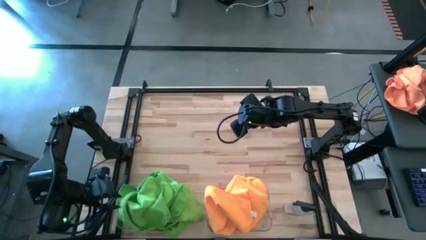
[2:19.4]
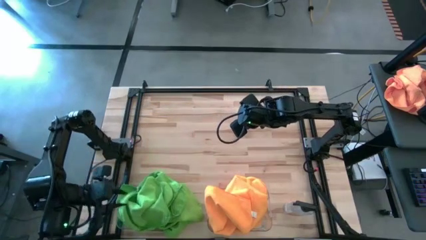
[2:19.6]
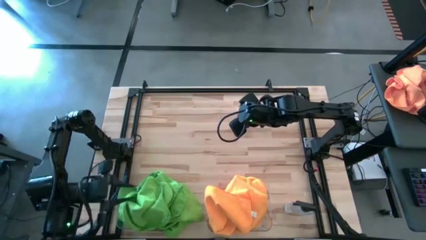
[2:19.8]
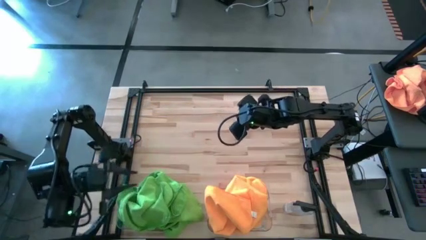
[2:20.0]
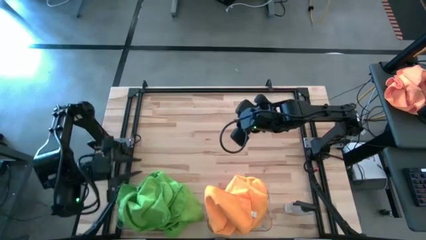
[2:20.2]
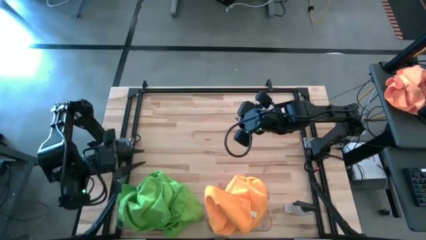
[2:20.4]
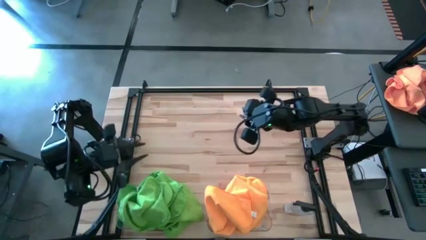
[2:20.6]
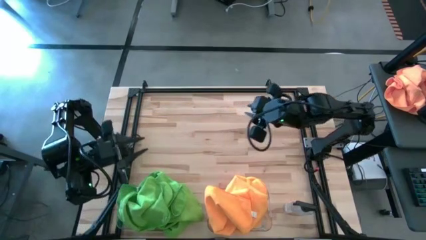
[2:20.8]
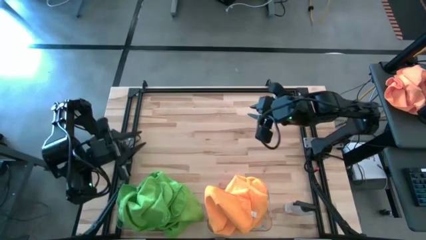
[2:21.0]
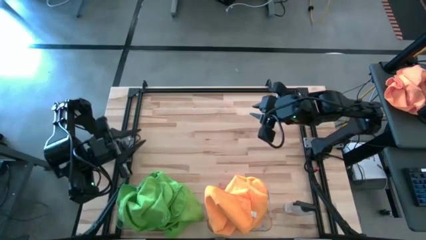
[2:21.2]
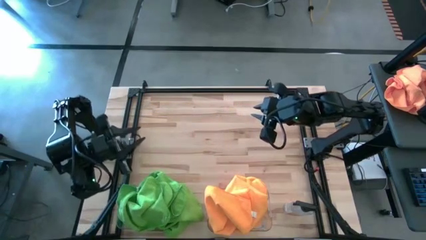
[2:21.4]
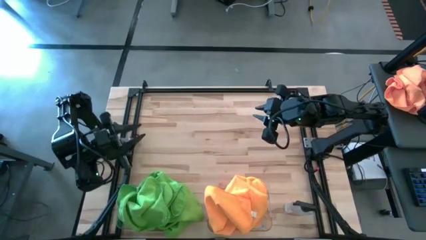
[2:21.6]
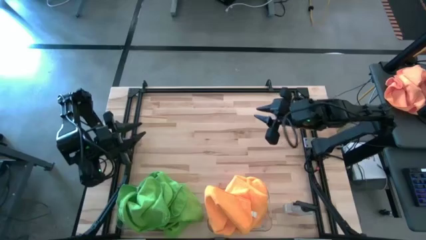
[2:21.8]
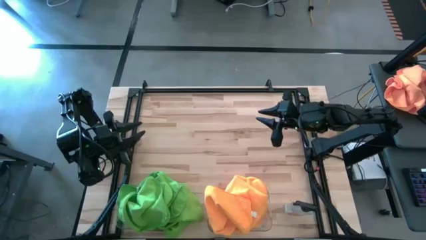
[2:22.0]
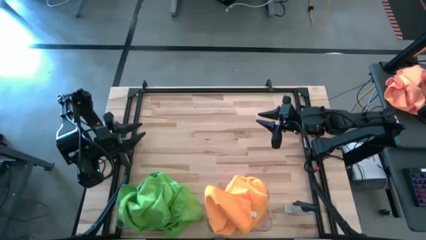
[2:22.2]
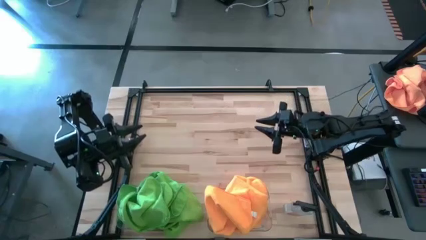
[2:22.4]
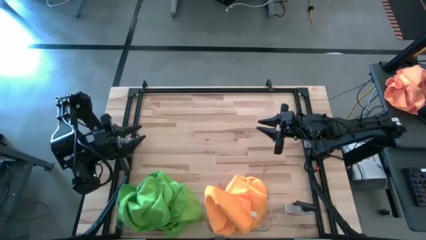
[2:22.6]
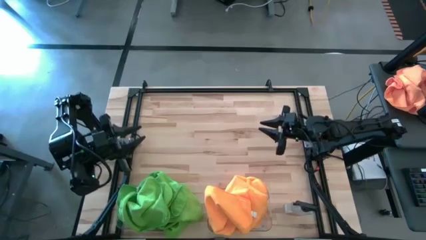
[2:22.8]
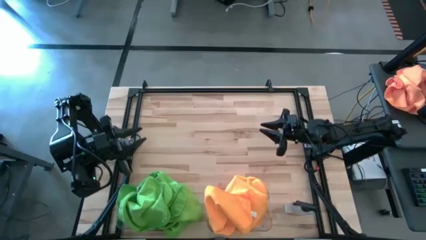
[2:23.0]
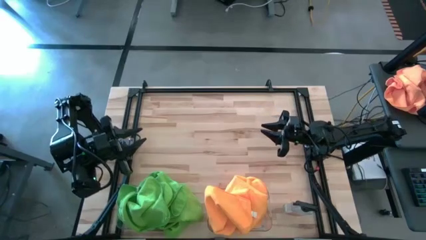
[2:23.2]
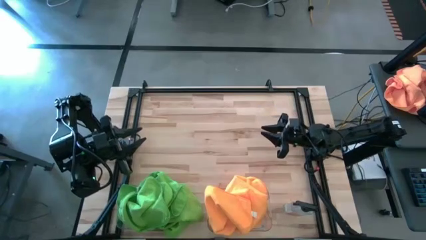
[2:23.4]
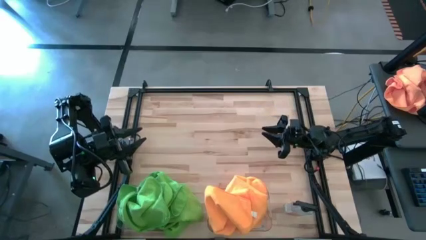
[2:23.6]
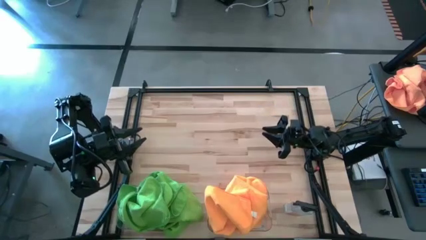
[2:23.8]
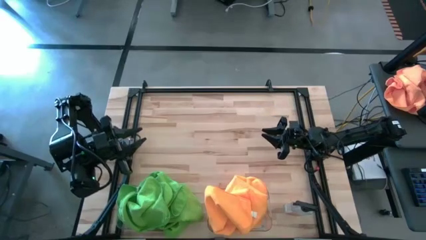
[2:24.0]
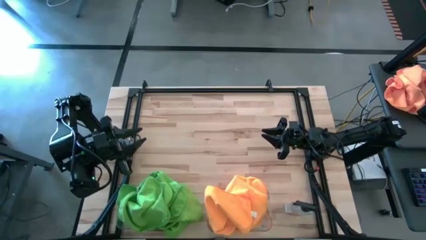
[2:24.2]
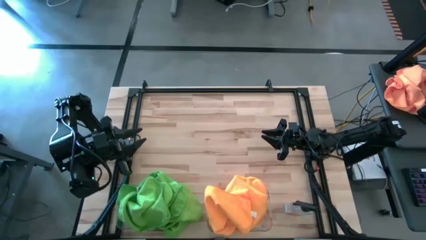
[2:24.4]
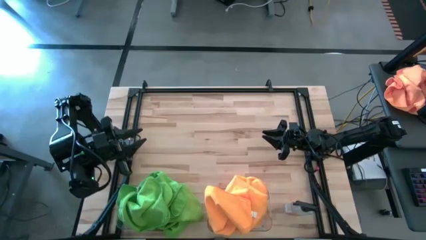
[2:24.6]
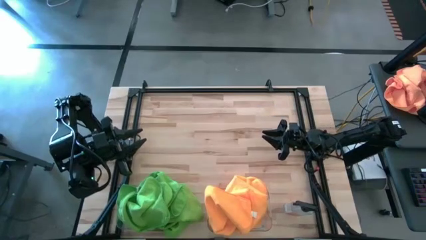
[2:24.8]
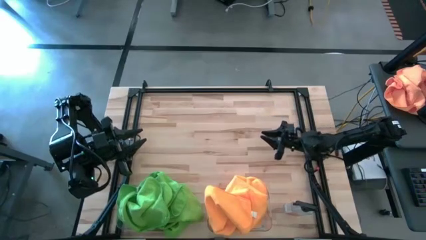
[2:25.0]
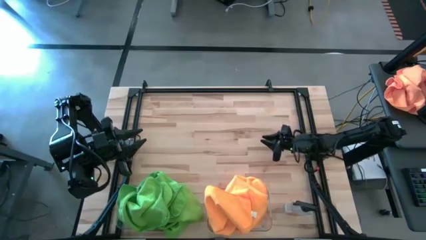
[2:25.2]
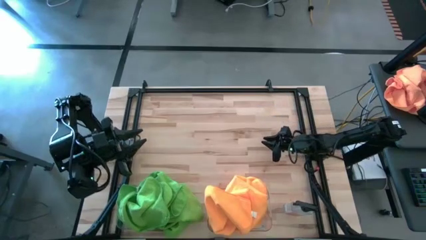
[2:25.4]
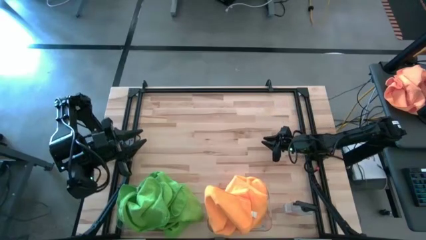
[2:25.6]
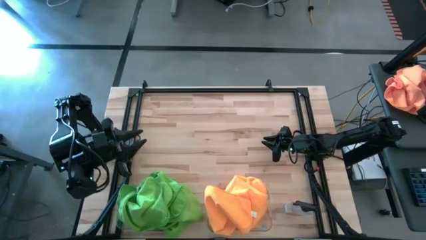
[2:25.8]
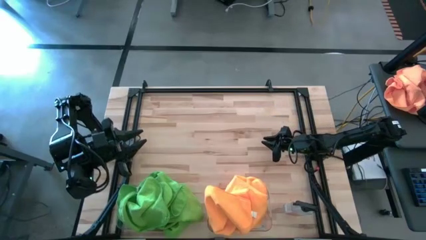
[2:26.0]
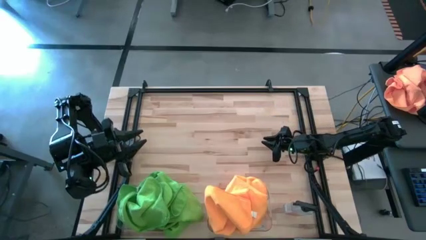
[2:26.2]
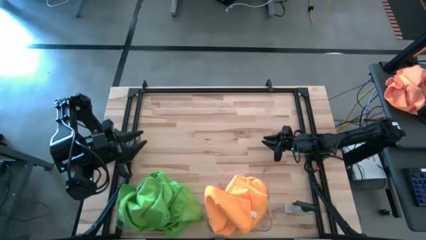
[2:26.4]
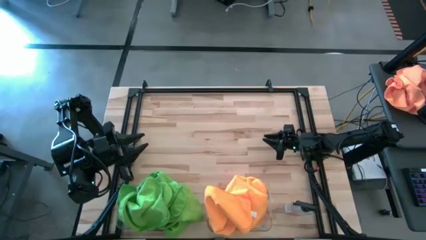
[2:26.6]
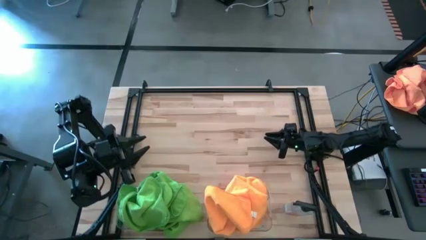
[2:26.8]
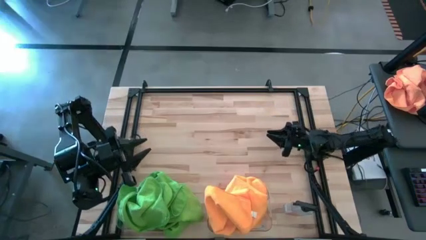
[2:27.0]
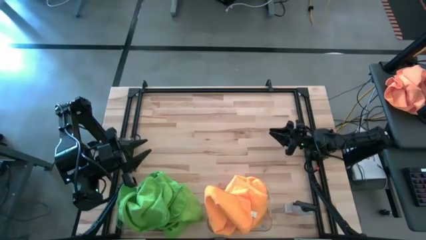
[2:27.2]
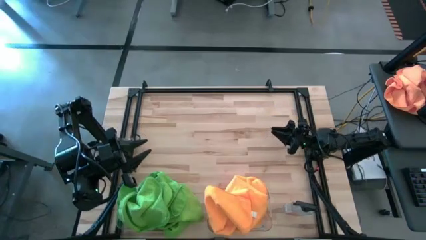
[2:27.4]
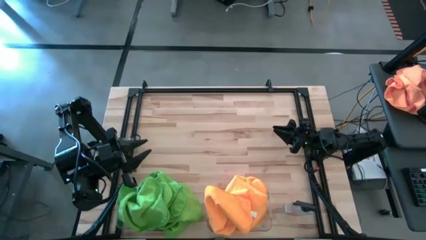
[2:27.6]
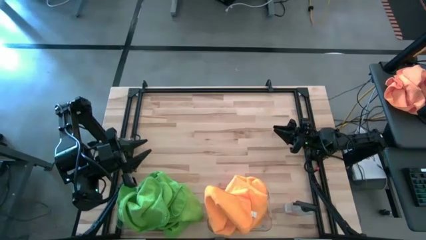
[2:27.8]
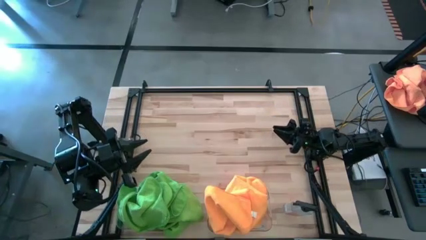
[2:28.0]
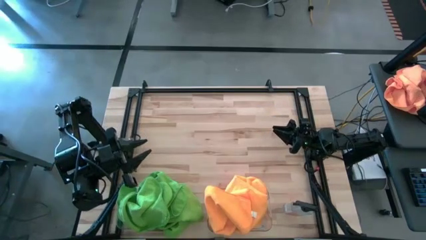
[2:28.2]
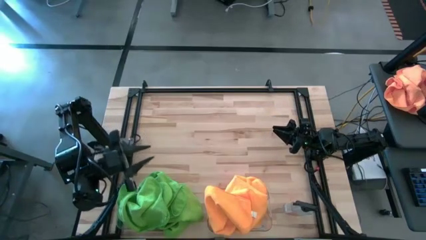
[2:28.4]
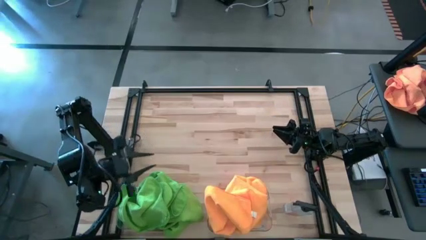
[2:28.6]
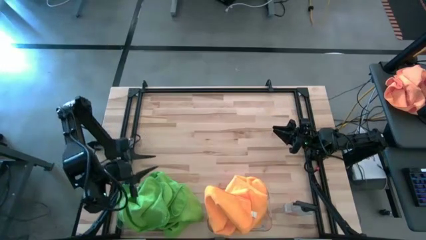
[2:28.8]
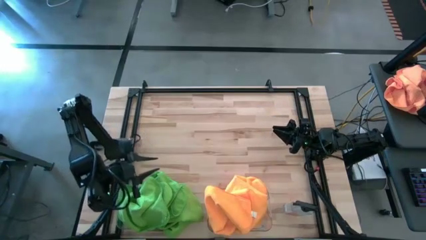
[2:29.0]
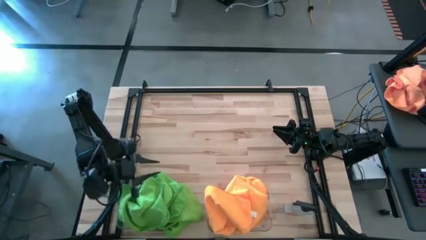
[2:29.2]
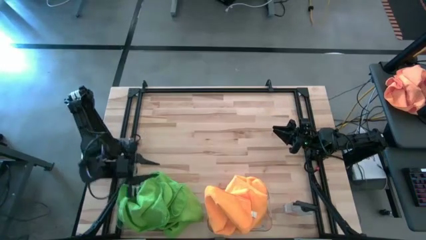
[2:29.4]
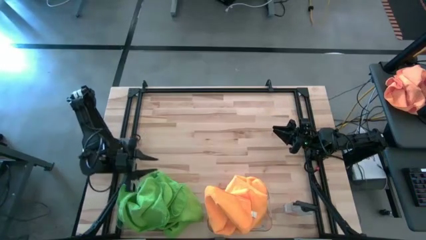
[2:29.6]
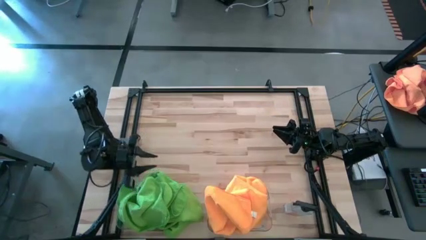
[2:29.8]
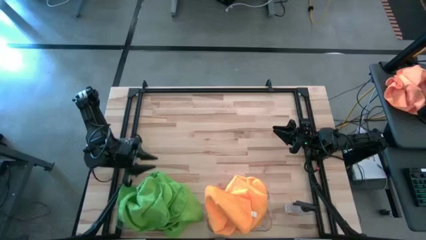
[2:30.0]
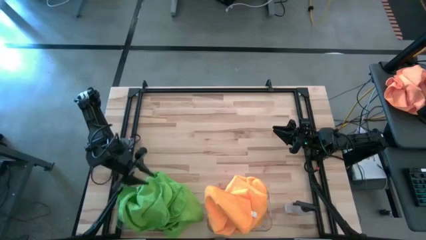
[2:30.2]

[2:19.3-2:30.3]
Task: Sort microfiber towel by color & place in baskets
Return to Home Position

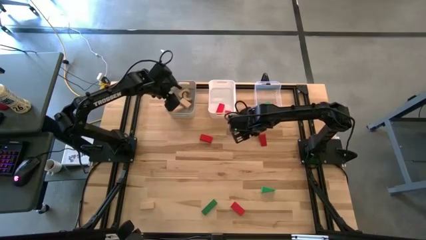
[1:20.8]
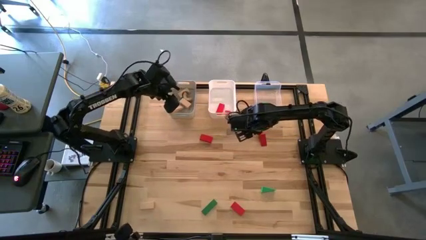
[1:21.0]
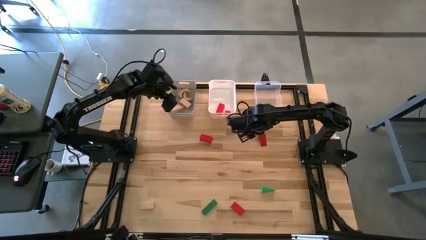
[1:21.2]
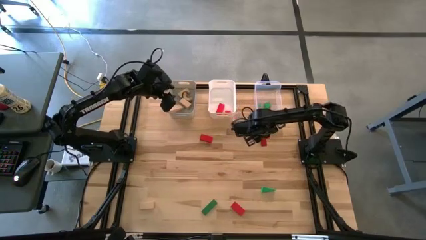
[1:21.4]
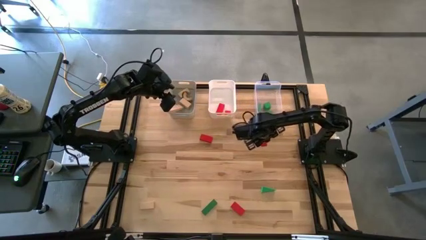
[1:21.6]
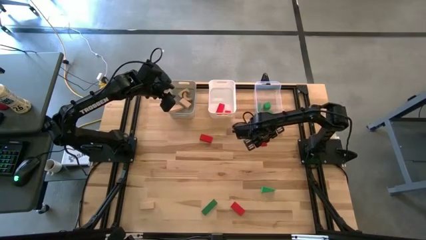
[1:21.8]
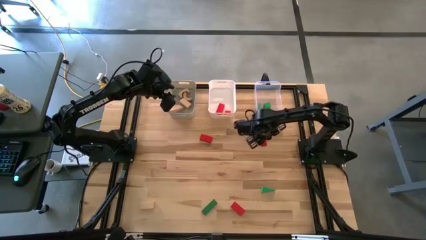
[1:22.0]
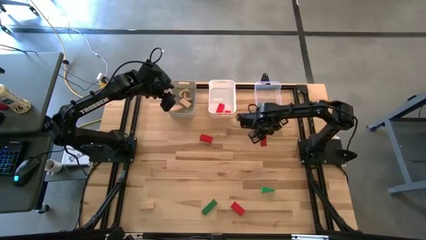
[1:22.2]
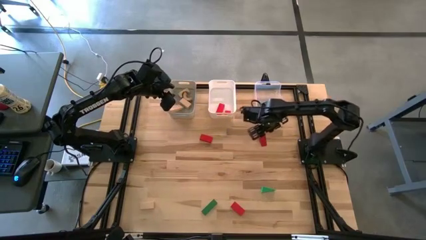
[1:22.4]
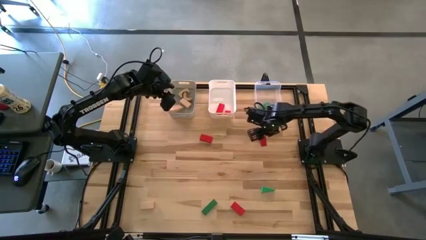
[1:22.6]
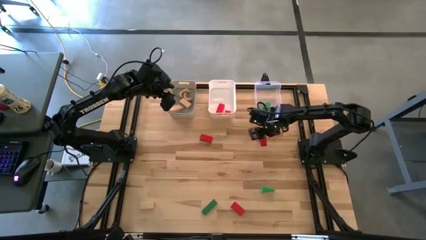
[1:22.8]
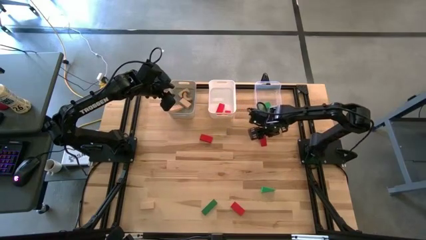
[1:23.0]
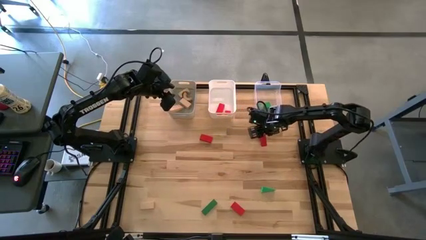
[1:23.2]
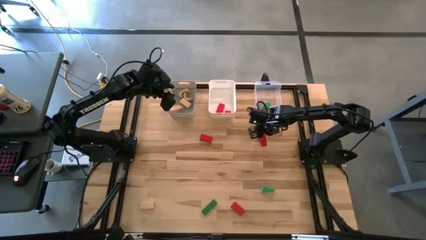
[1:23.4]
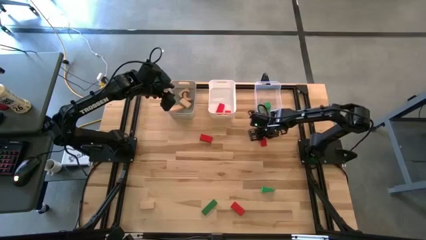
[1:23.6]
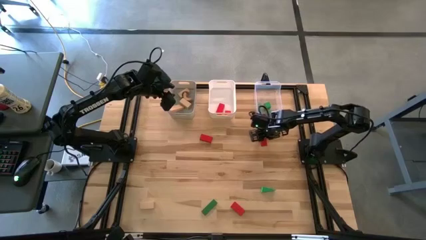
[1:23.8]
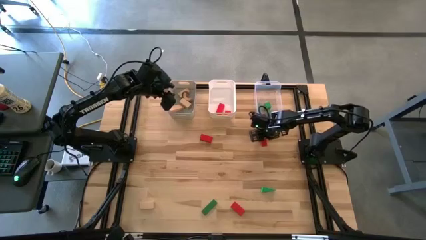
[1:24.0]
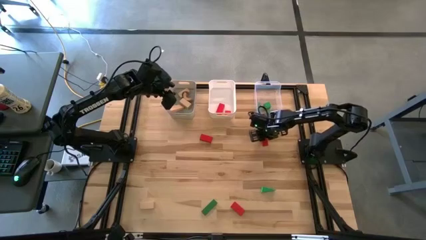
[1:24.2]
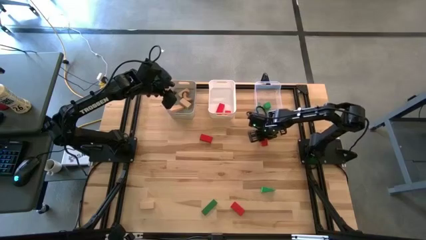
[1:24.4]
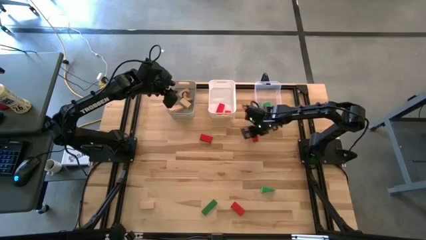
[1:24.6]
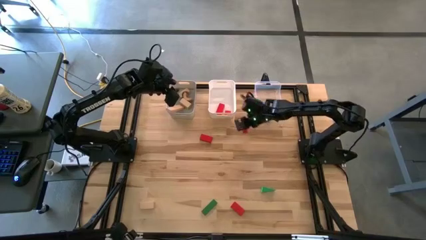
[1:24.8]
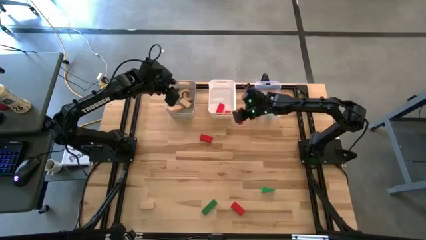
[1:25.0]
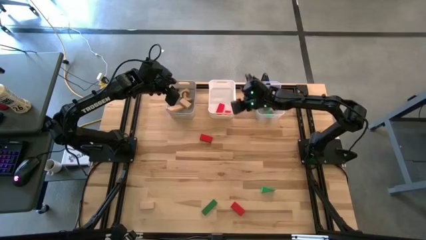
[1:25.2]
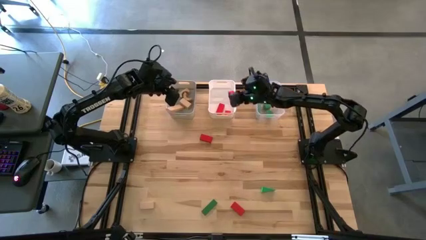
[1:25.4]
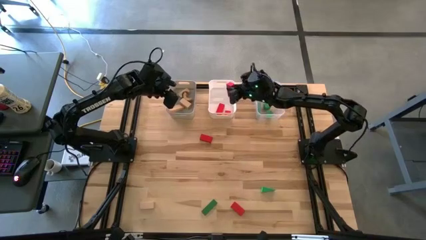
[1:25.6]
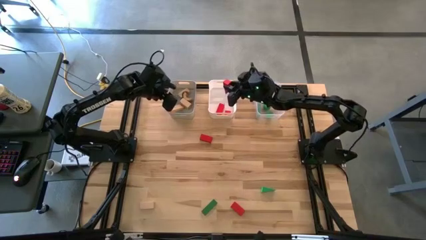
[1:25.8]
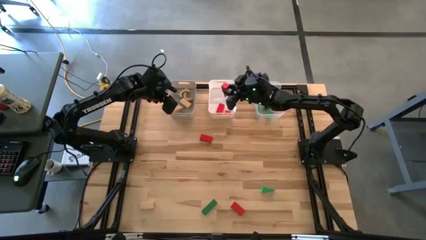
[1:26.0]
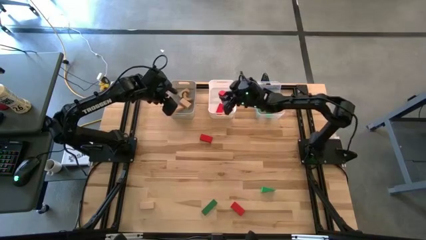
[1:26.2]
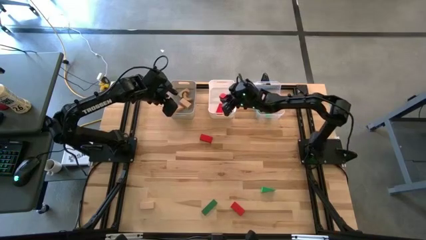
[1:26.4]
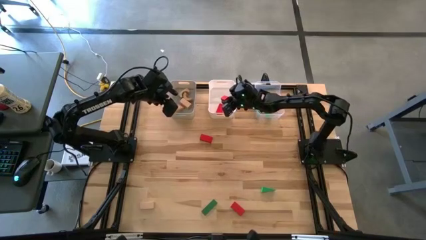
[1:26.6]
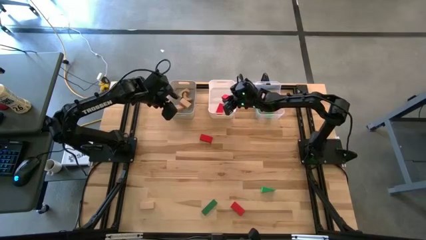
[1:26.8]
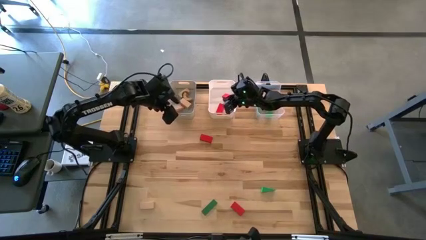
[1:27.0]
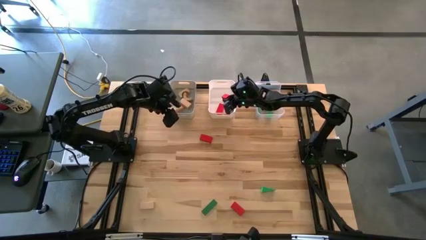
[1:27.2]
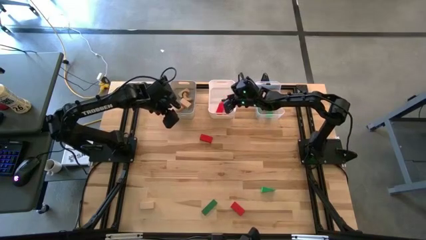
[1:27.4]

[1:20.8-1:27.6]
Task: Sort & place blocks by color
Put the top left red block into the white bin
